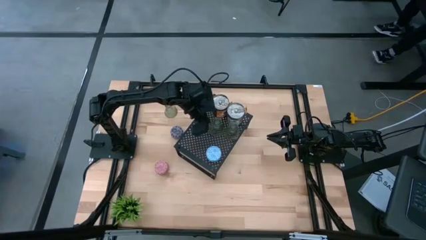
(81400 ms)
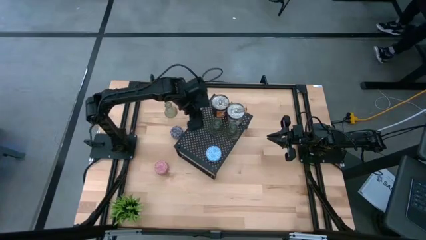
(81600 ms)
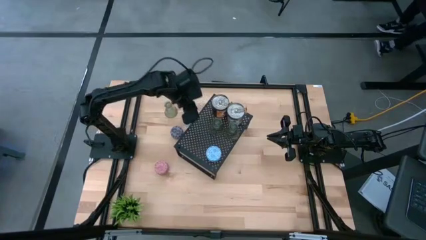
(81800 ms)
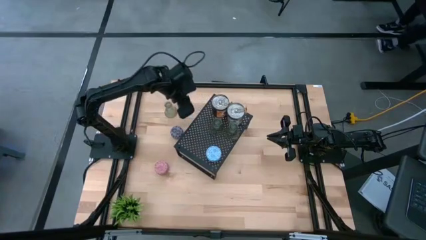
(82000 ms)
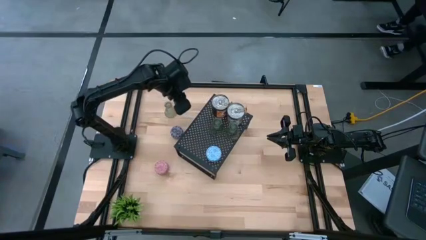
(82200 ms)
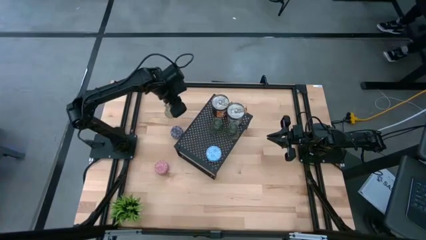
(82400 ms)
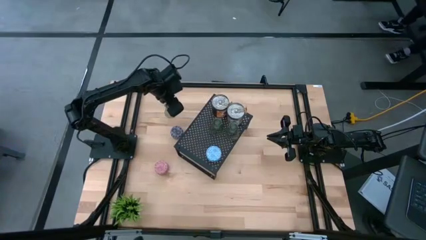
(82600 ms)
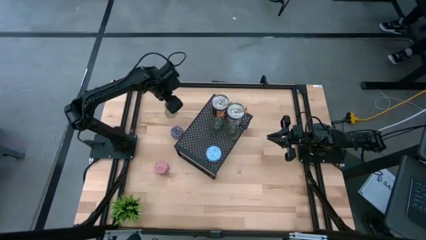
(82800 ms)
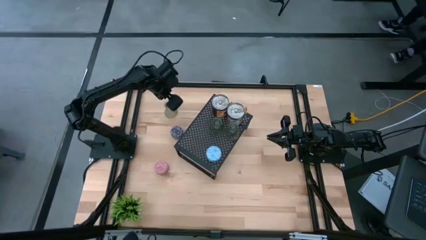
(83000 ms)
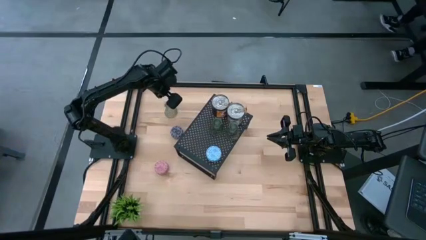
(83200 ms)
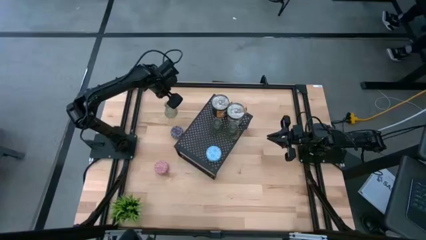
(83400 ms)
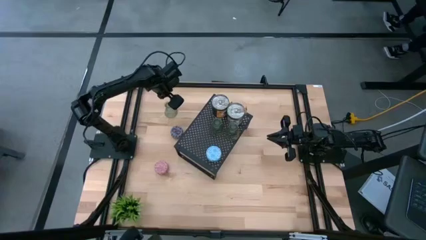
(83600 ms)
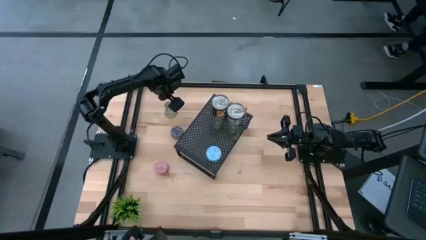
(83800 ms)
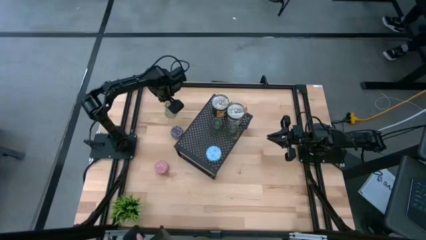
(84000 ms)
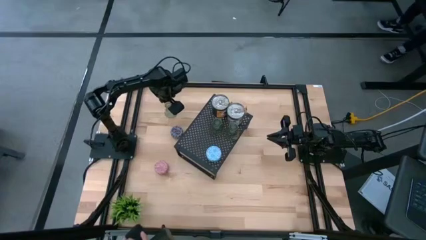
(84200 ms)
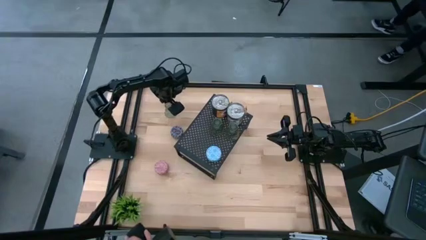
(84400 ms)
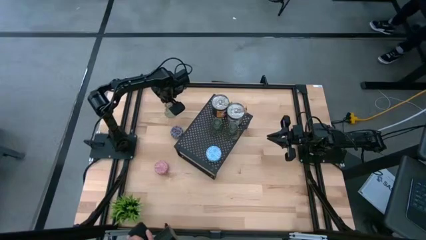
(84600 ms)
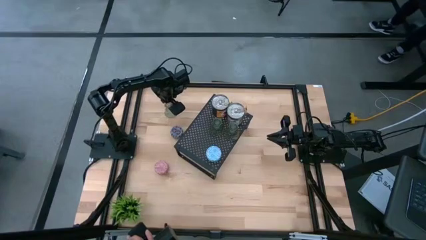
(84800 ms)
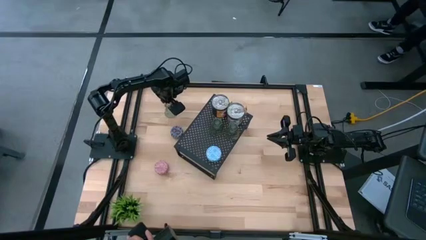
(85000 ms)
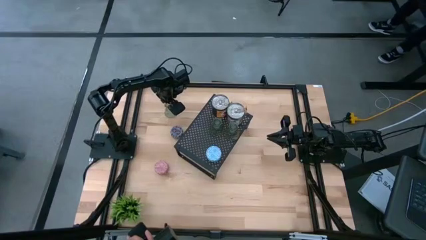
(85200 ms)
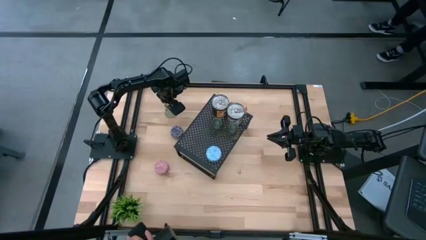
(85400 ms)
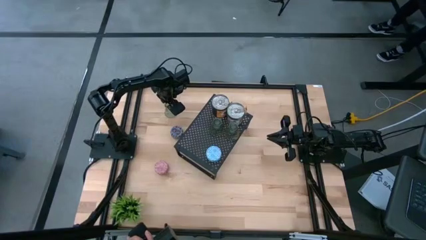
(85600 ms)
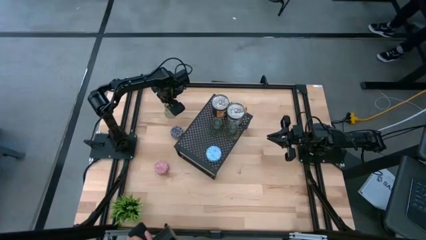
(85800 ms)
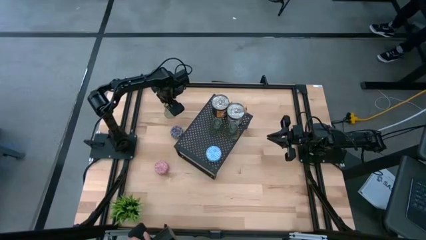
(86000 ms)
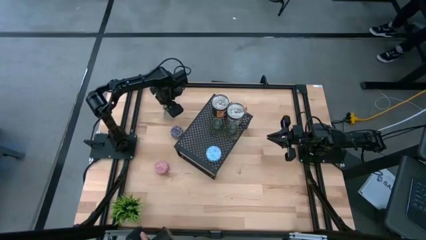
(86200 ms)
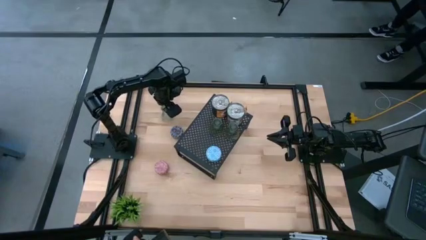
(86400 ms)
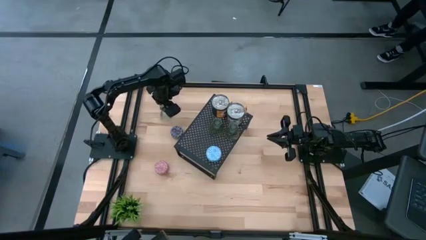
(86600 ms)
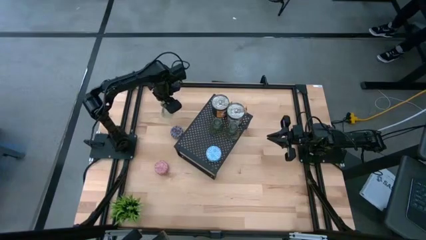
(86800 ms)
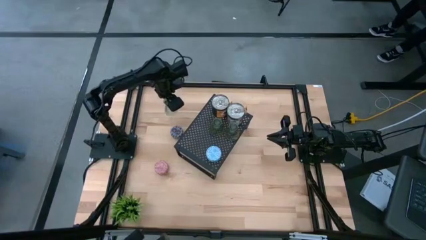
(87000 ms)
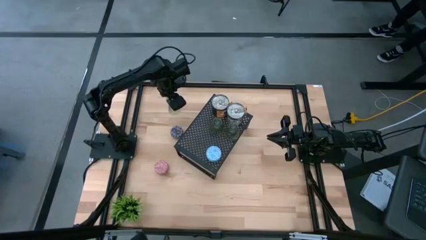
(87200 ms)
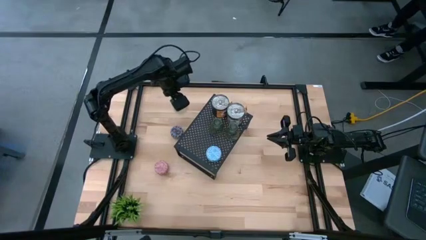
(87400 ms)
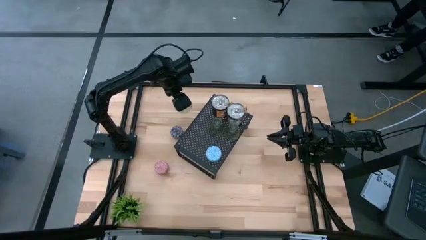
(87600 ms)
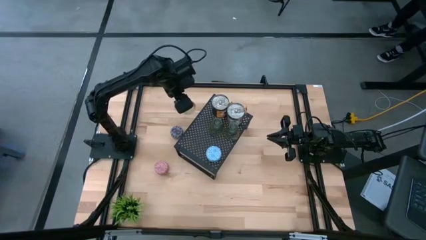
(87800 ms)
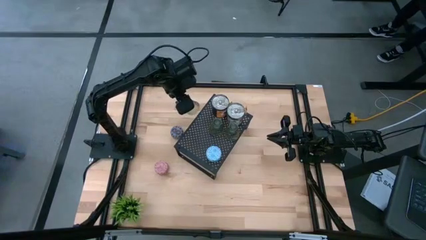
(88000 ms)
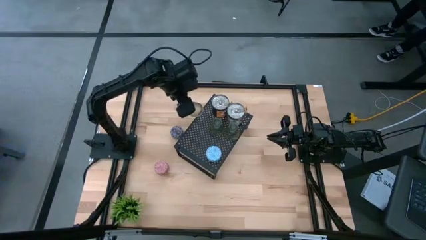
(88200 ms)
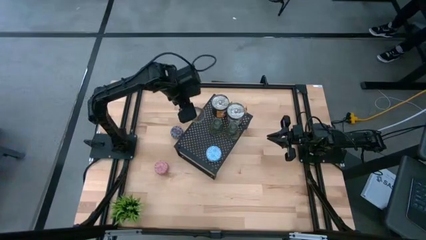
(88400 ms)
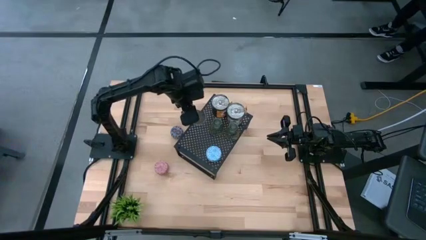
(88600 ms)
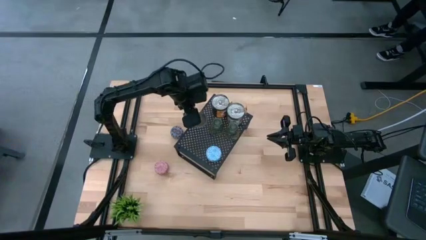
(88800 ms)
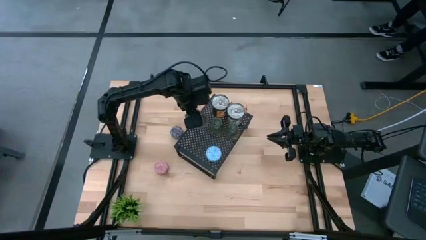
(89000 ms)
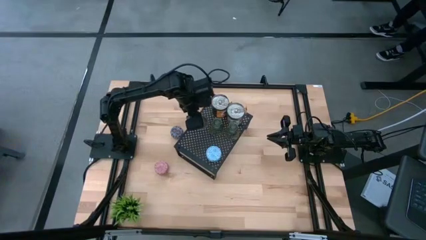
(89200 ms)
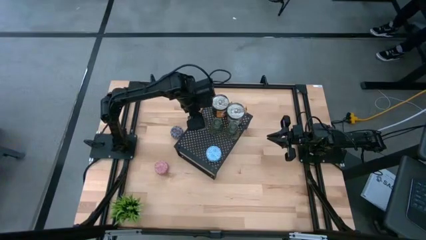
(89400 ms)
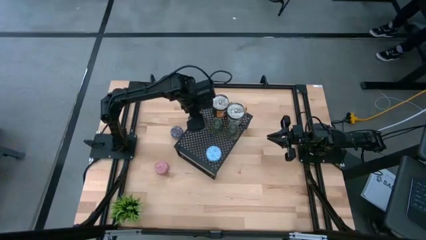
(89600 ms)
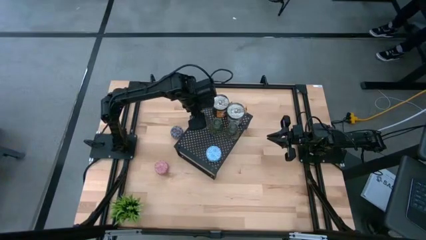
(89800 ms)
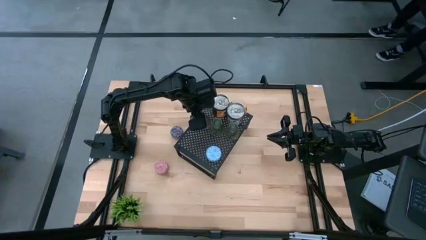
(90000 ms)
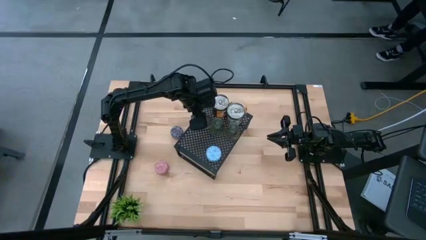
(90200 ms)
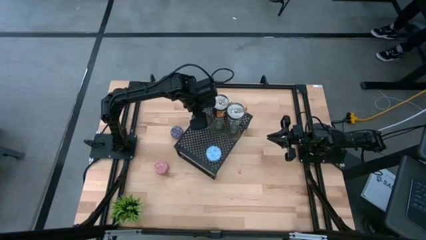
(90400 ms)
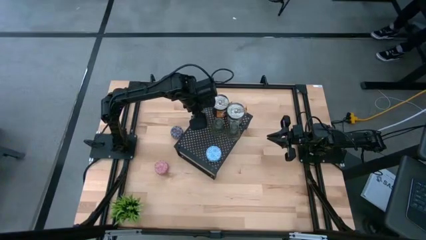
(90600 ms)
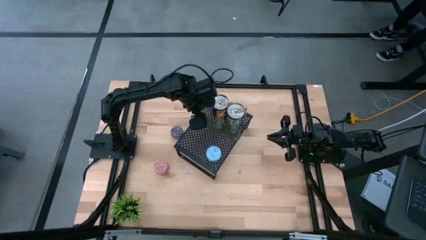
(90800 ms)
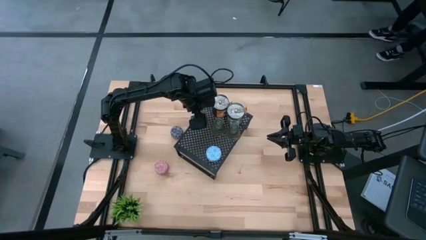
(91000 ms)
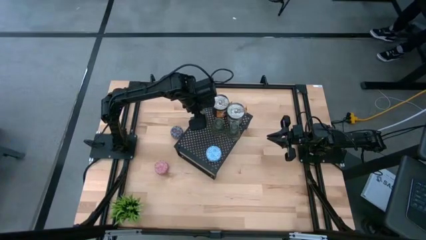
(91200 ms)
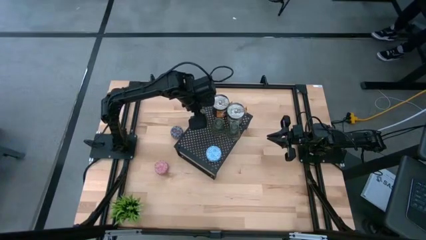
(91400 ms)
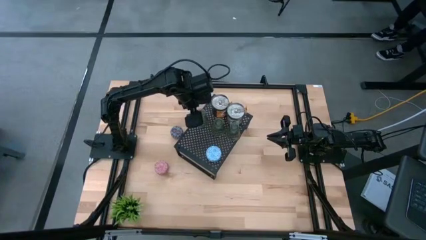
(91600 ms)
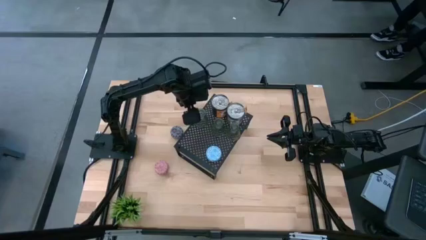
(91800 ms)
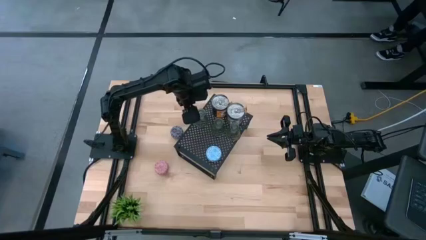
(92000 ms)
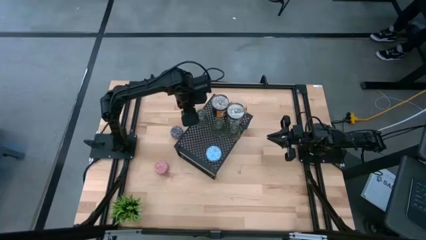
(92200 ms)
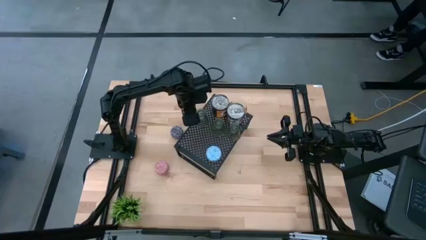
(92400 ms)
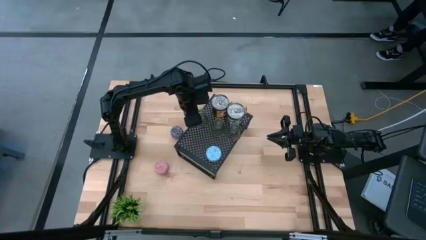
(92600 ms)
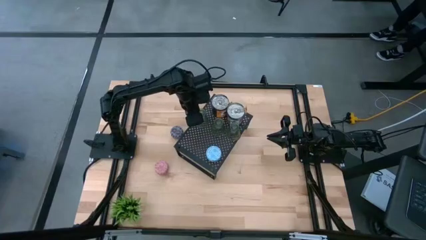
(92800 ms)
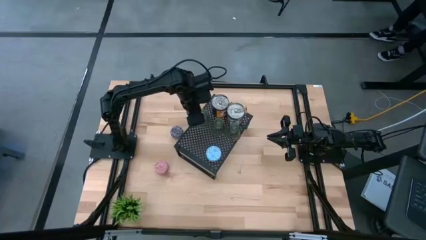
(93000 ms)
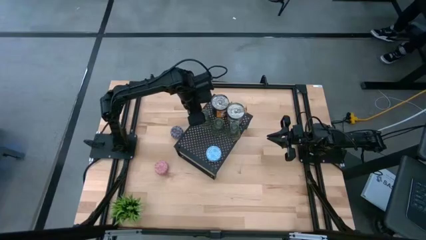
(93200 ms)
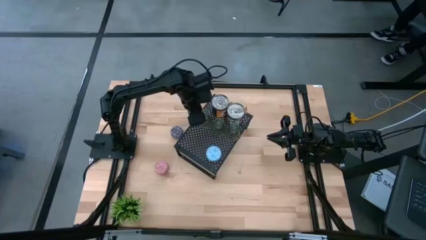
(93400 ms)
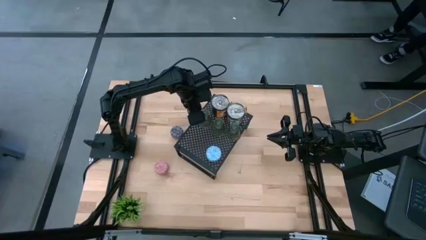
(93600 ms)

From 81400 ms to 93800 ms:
Task: Pick & Place candle stick holders
Put the glass candle holder on the shelf

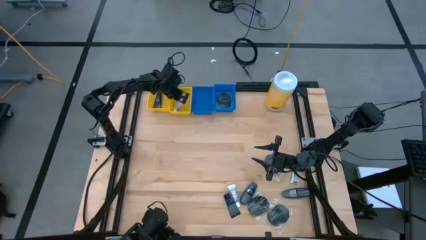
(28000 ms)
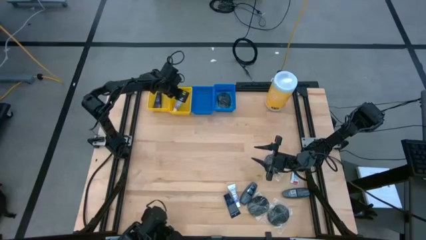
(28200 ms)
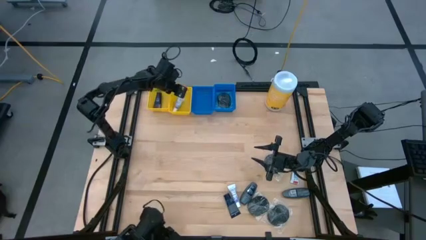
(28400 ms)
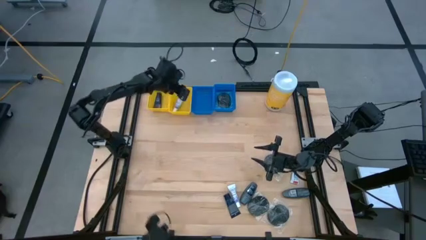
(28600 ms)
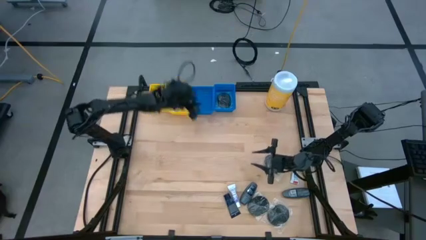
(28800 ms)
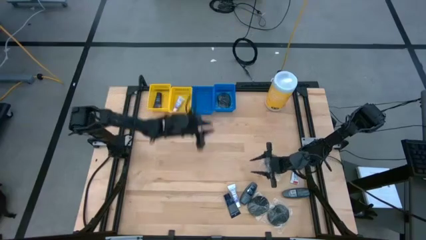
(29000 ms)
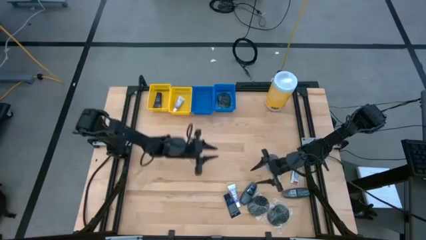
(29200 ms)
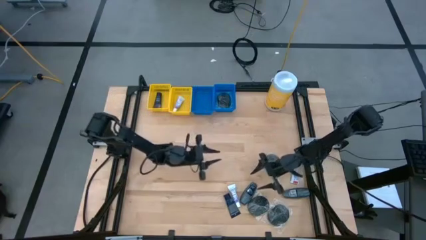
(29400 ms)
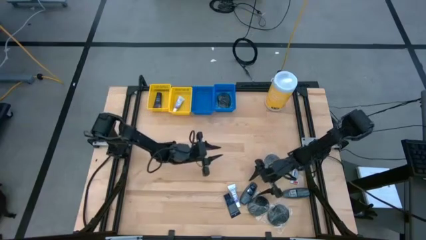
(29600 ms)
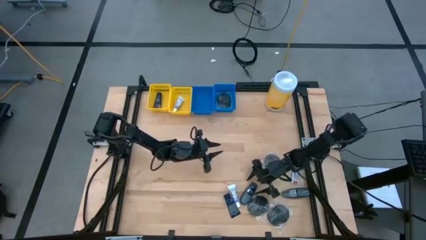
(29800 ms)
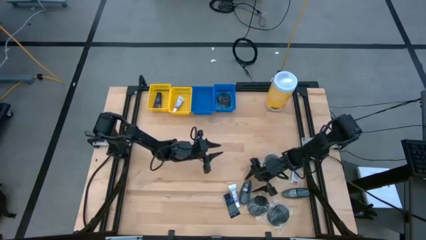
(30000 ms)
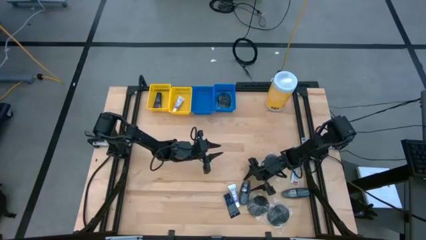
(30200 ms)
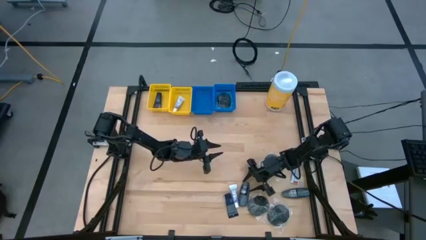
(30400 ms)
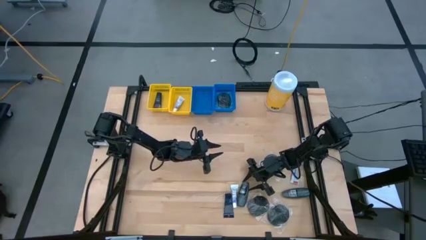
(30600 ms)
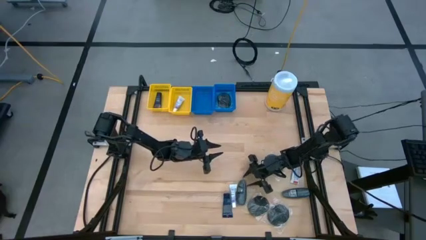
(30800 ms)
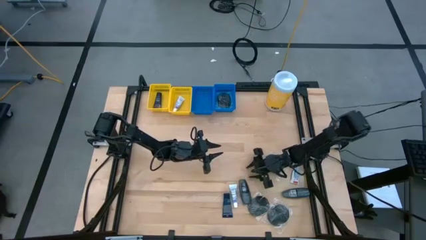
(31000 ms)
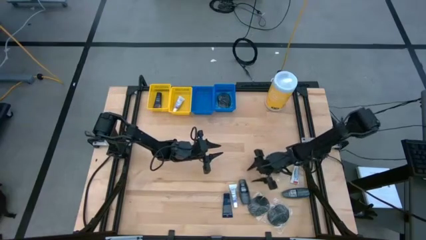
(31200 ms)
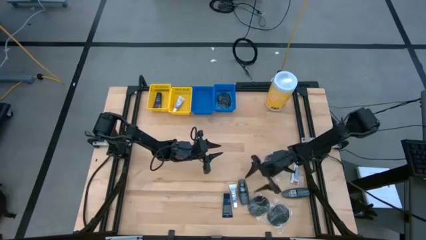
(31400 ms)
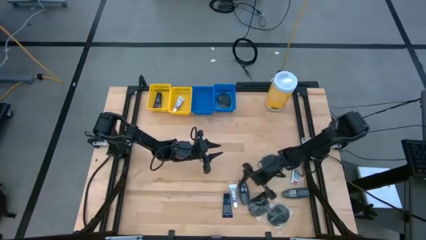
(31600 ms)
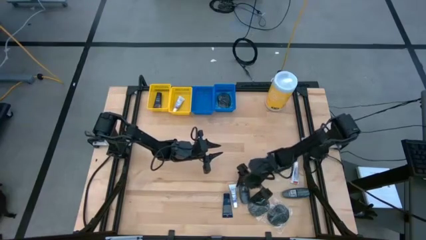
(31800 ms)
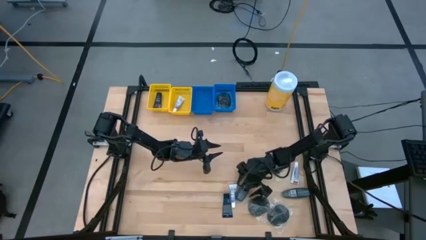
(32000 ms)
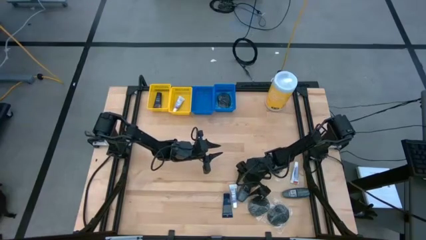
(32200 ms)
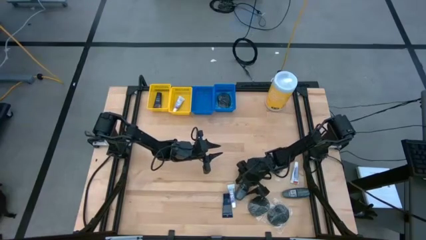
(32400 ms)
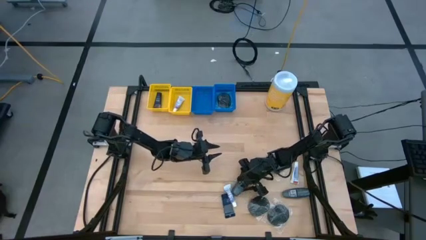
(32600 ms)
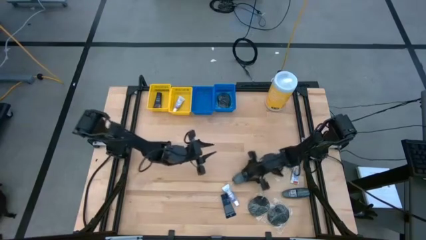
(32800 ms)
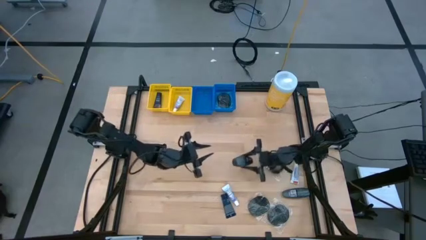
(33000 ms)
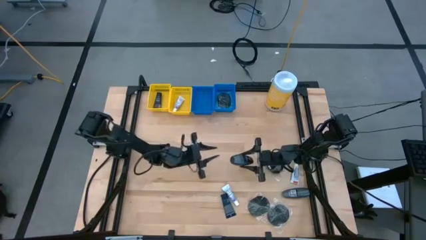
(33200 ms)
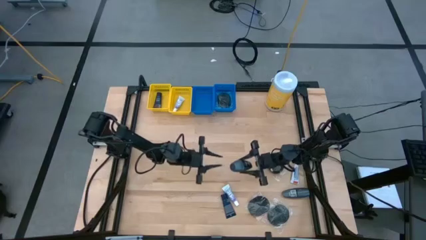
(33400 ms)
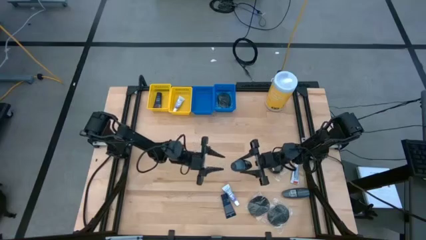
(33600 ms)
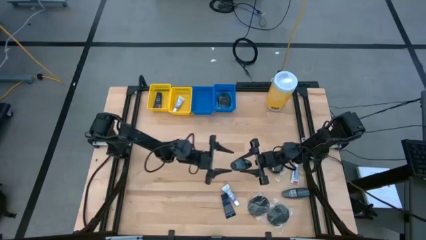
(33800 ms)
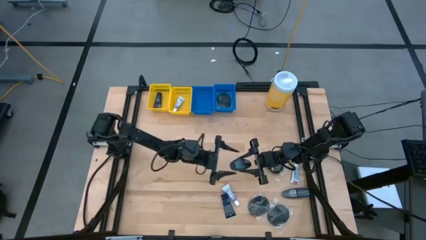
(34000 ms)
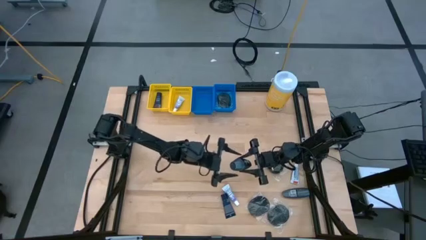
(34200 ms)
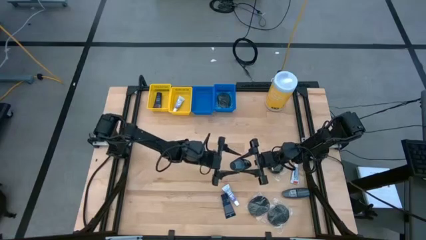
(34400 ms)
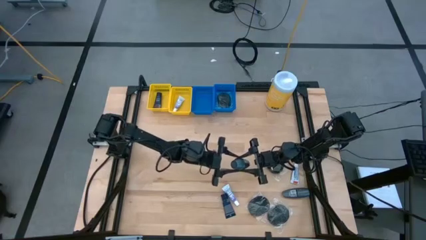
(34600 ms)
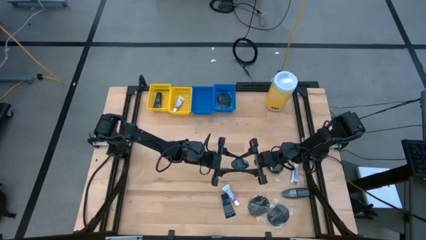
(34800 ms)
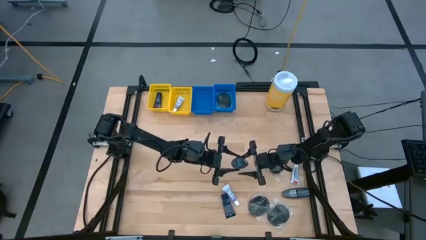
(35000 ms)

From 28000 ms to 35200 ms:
Task: Pick & Place Travel size toiletries
Put the black roll-on deodorant into the left blue bin
